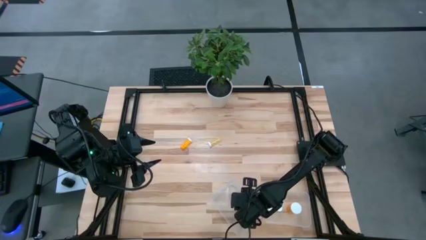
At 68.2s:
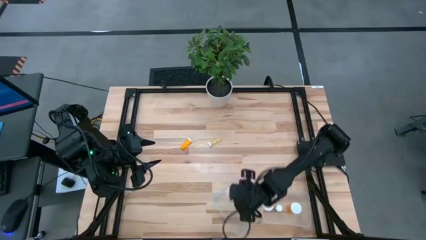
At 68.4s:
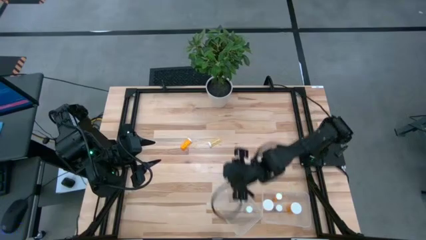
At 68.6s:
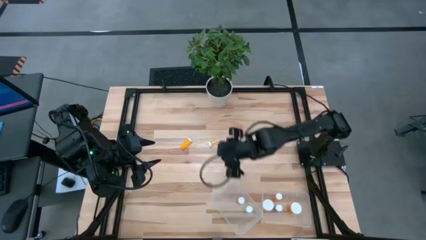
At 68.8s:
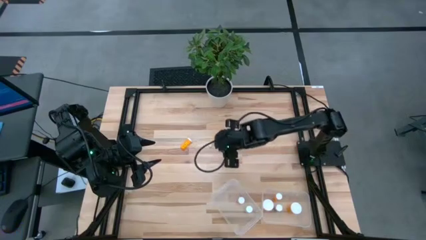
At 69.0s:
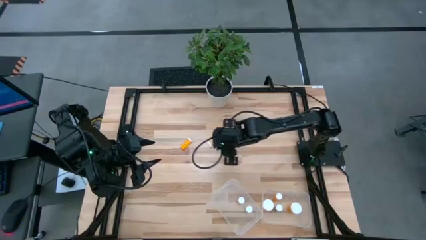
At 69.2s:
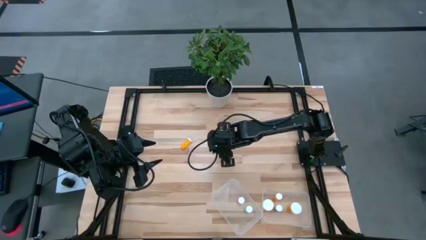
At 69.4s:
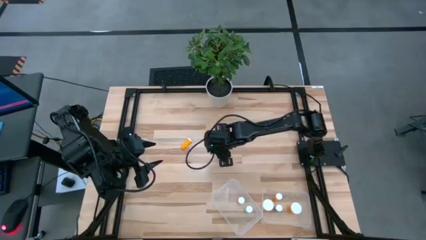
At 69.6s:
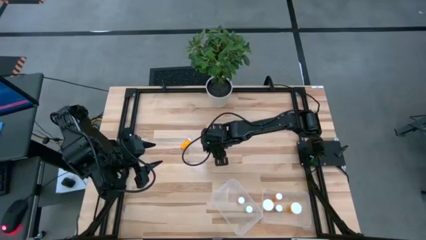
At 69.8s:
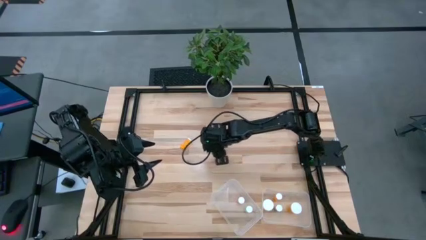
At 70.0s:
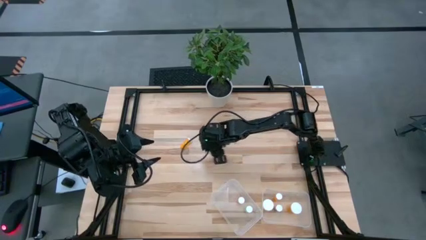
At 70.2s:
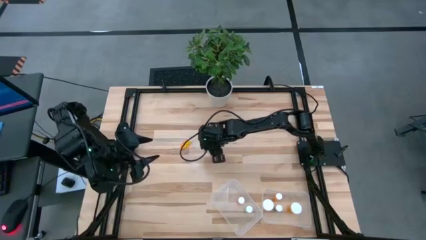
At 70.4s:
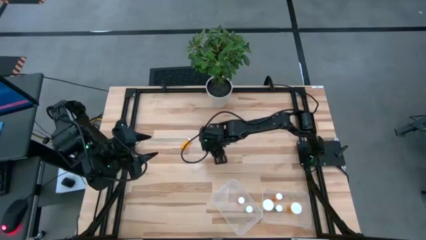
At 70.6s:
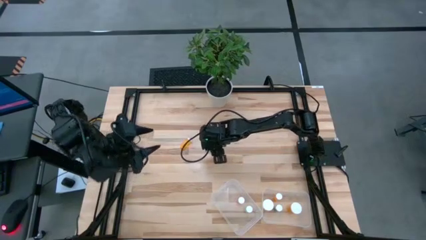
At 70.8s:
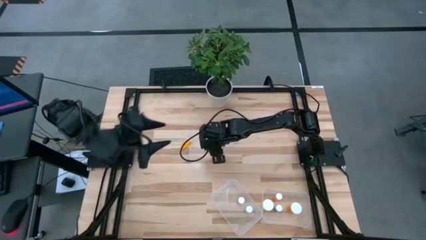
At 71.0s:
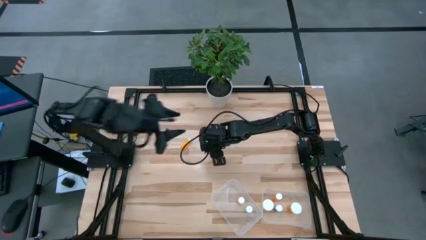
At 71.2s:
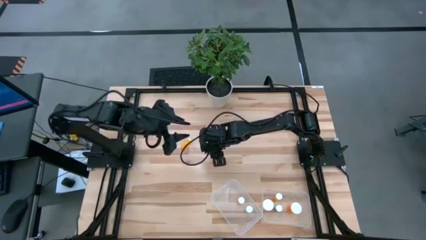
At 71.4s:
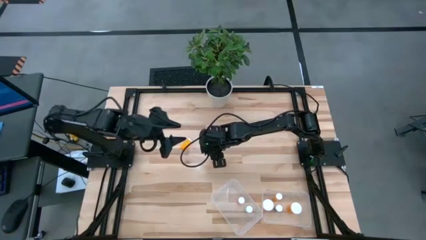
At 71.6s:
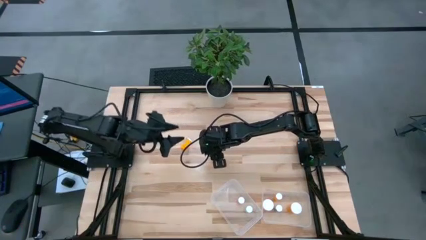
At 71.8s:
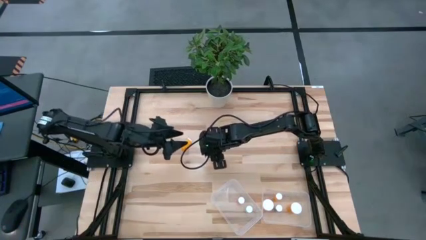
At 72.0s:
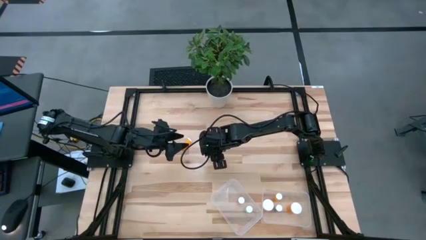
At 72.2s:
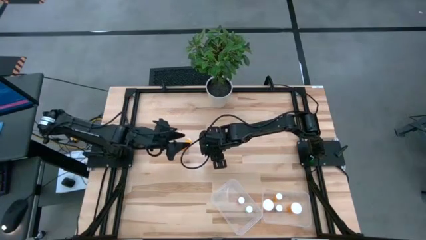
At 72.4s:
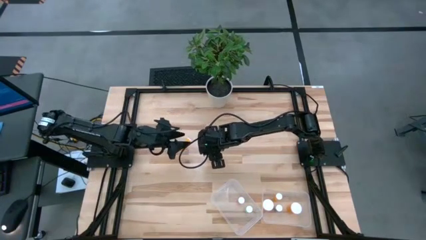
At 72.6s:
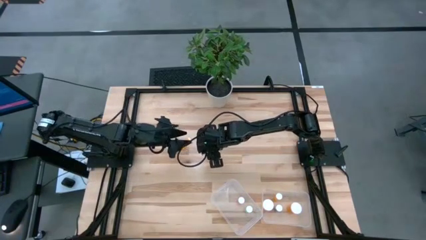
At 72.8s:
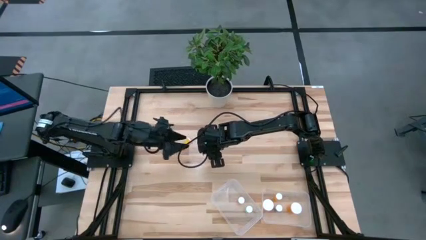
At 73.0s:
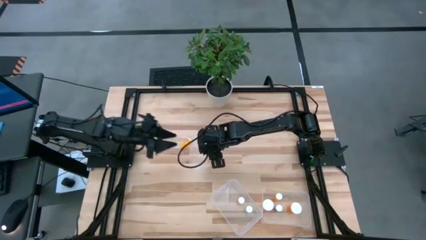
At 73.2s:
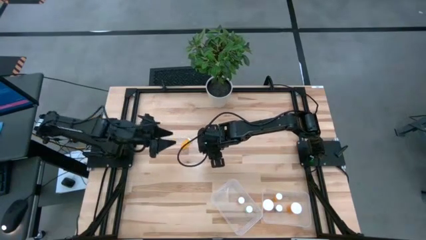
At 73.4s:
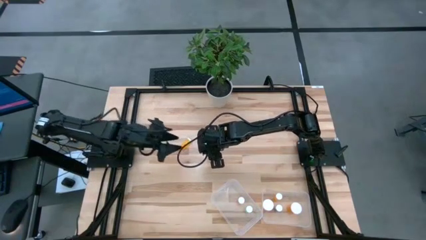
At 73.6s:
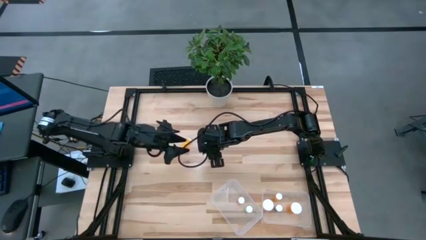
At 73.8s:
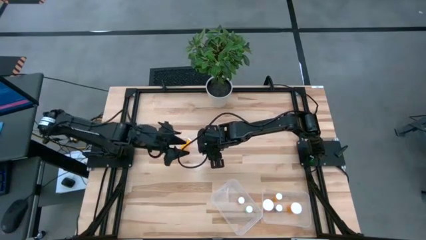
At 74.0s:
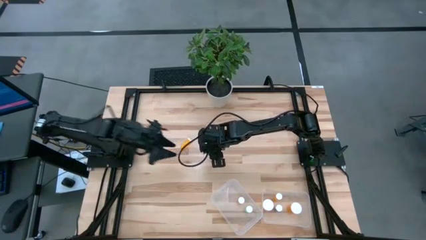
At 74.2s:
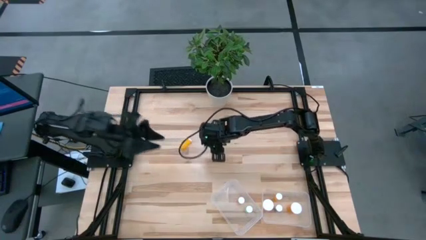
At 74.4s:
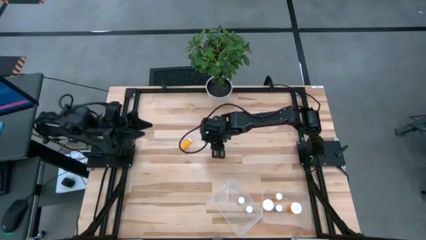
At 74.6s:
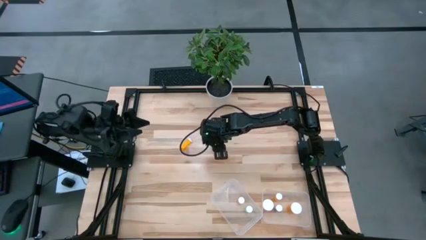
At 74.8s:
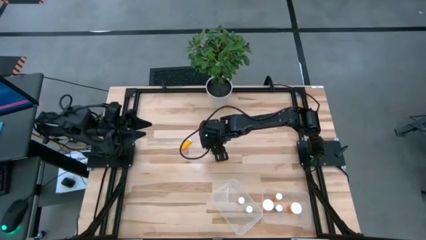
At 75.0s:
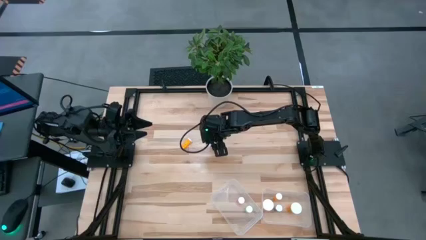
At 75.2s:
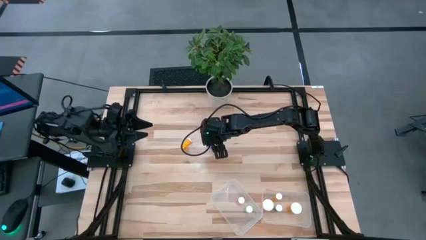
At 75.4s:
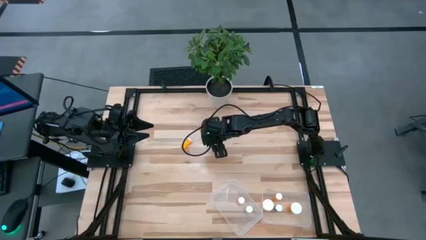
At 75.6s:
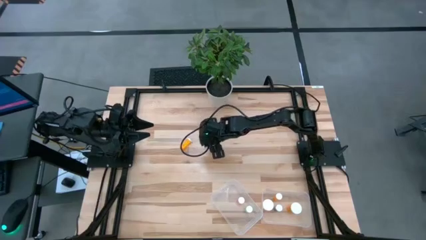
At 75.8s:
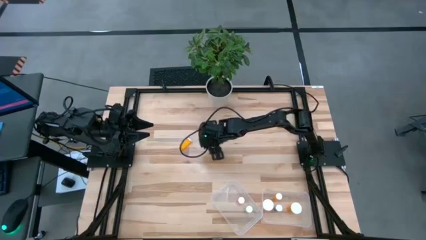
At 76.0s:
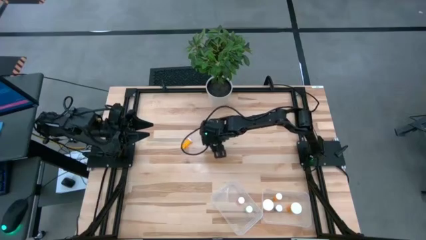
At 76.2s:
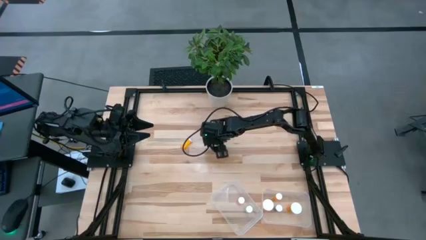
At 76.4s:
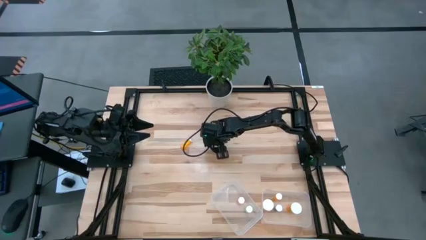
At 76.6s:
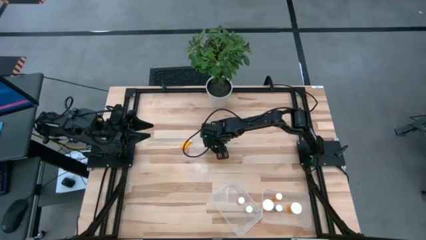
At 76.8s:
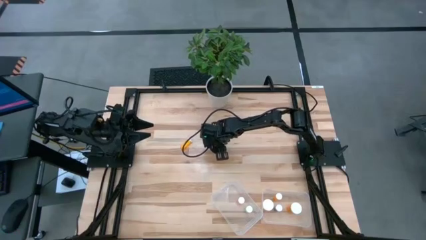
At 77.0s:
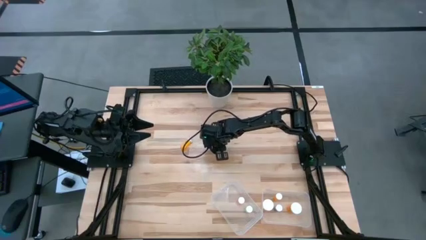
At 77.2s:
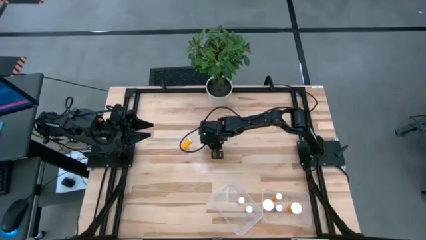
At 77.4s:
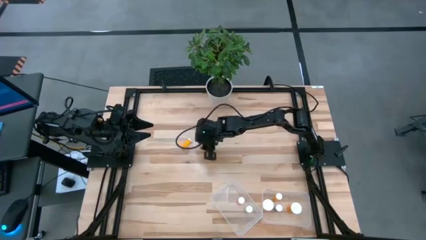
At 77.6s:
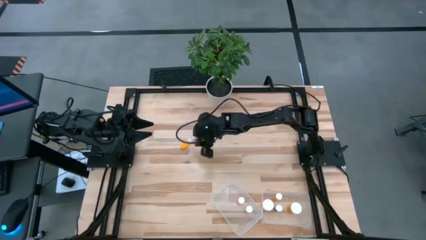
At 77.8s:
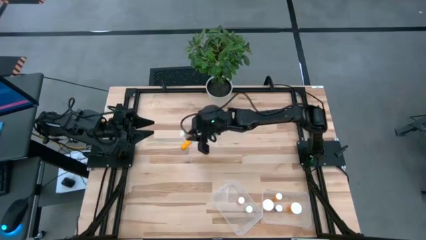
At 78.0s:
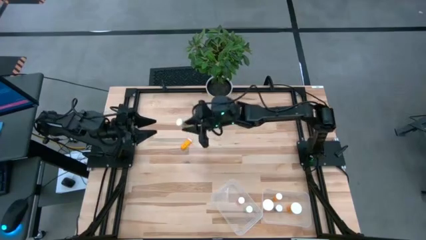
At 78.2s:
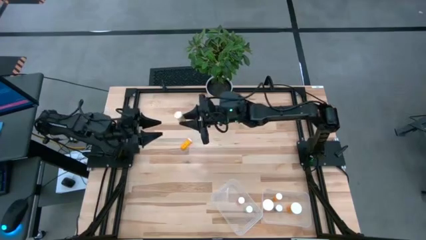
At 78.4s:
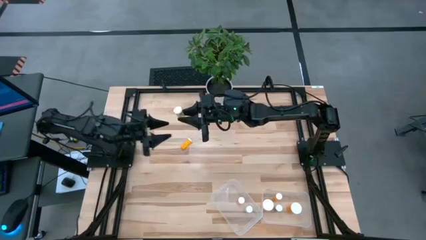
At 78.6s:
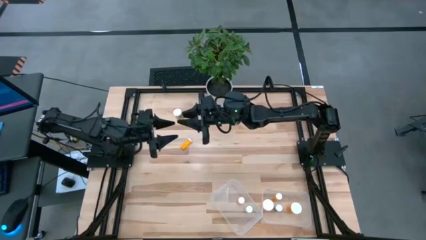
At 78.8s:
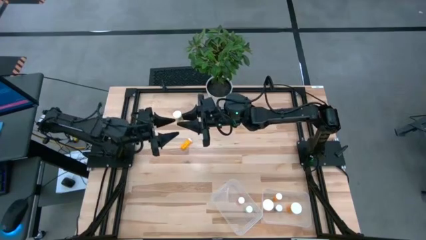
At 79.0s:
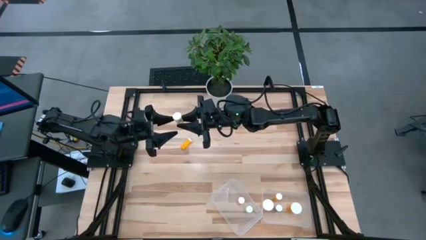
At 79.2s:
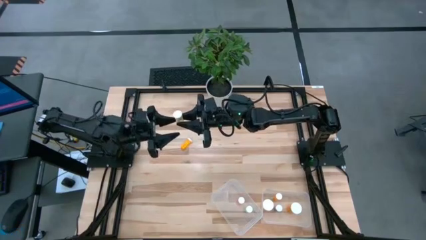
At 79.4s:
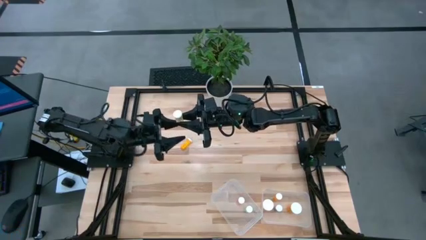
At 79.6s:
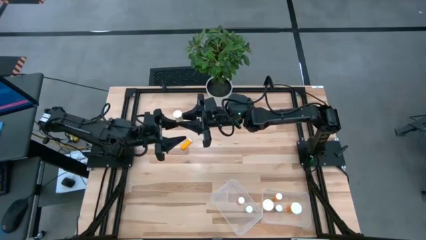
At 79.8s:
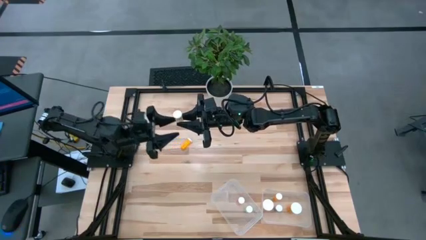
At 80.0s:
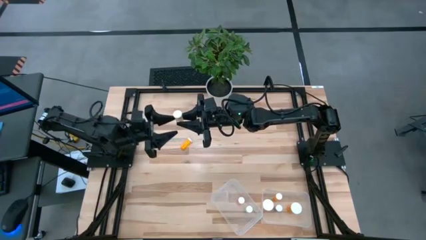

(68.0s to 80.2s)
Task: Pick and place medicine bottles into bin by pill shape (circle, oval)
Put the yellow pill bottle into the left transparent bin

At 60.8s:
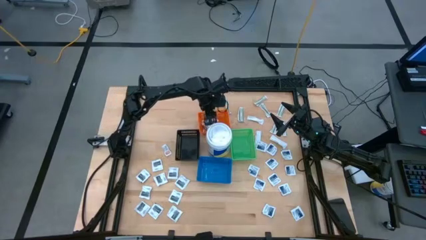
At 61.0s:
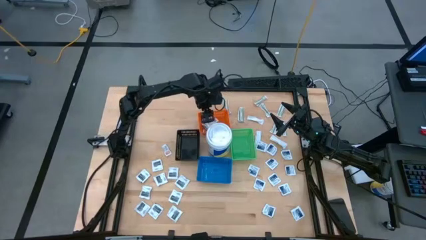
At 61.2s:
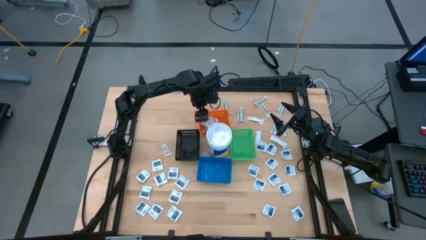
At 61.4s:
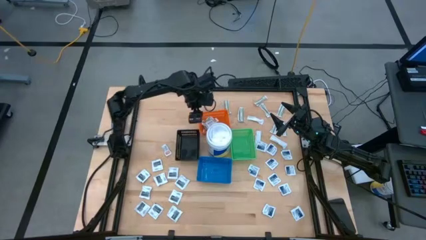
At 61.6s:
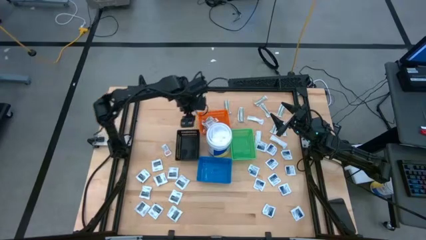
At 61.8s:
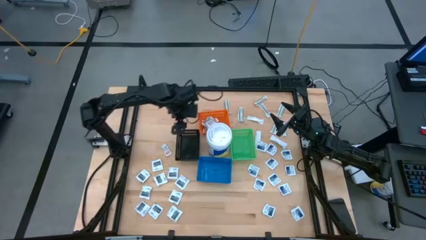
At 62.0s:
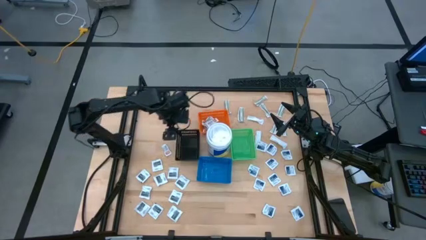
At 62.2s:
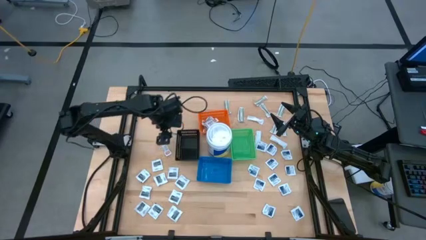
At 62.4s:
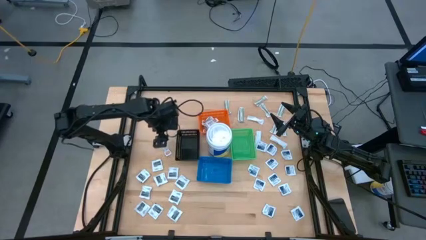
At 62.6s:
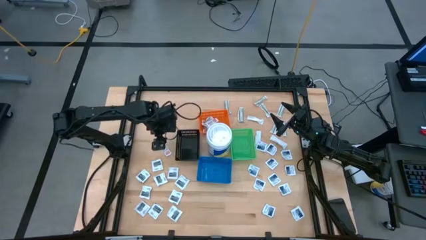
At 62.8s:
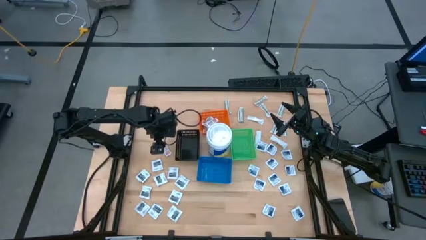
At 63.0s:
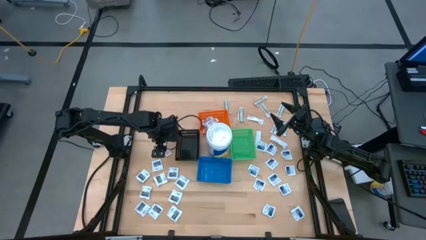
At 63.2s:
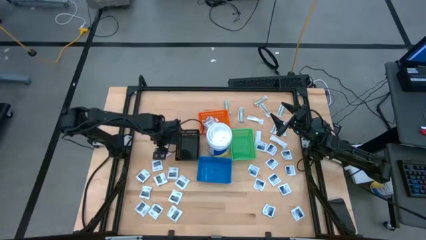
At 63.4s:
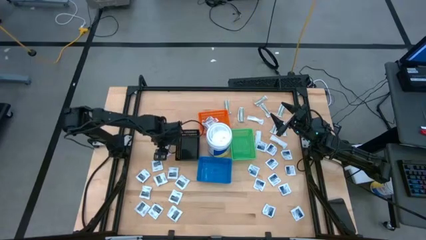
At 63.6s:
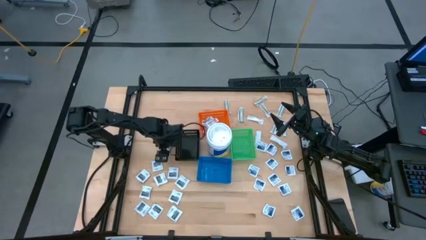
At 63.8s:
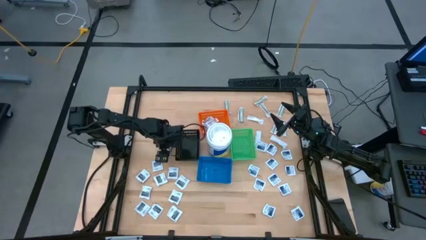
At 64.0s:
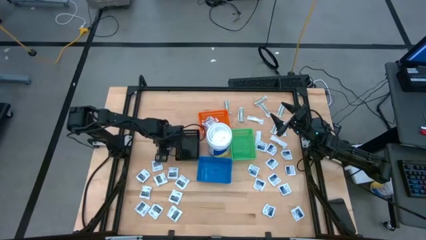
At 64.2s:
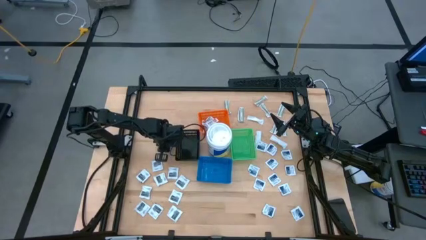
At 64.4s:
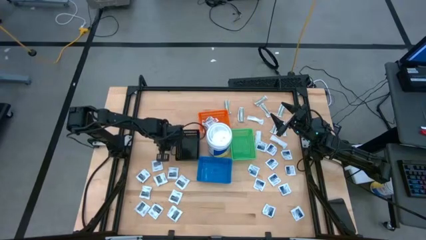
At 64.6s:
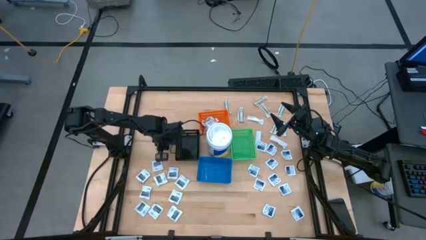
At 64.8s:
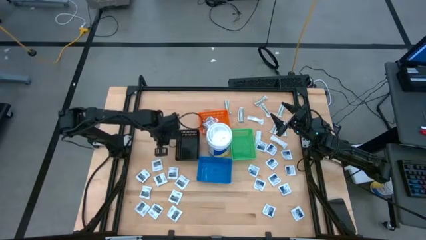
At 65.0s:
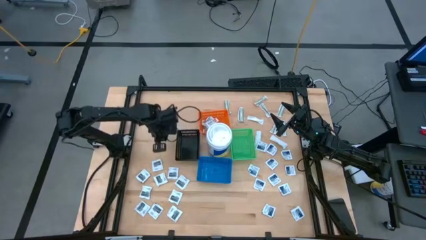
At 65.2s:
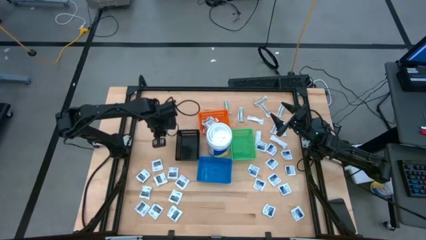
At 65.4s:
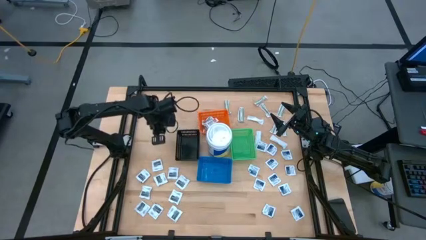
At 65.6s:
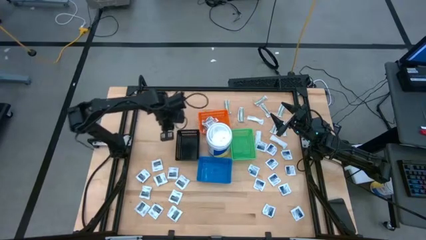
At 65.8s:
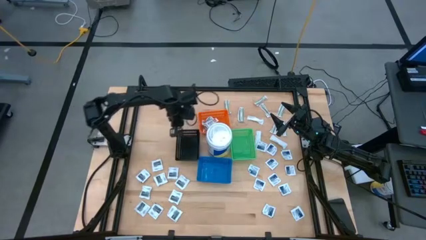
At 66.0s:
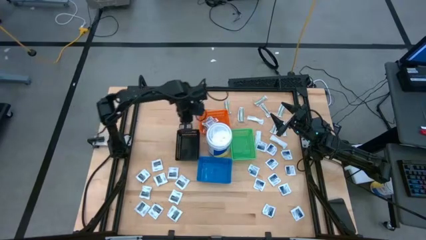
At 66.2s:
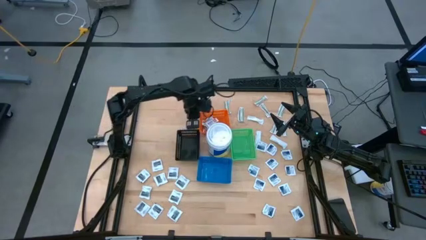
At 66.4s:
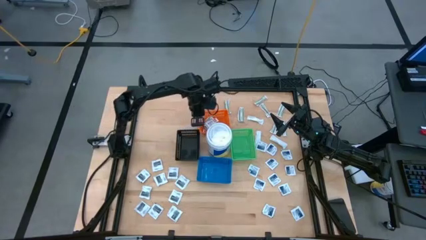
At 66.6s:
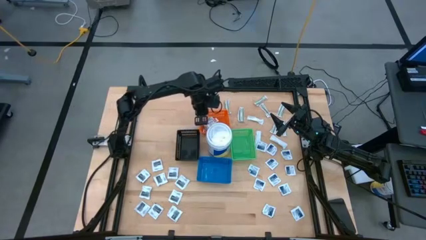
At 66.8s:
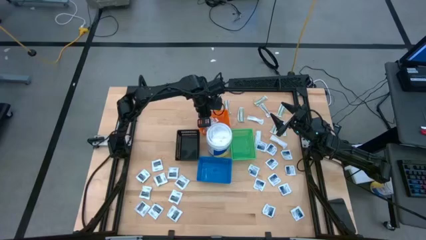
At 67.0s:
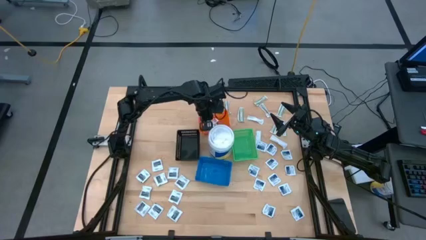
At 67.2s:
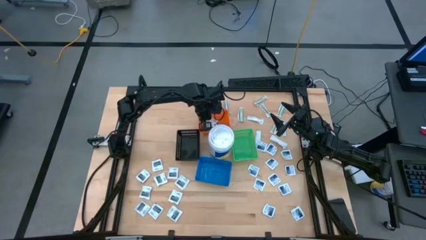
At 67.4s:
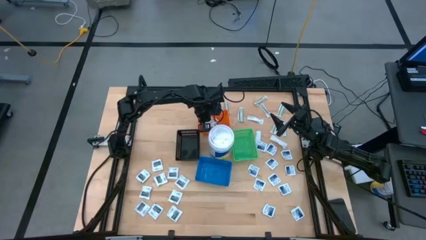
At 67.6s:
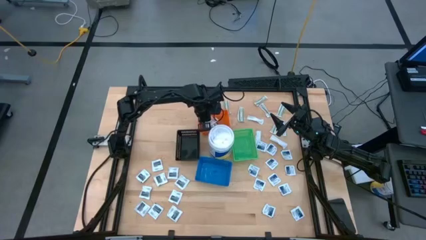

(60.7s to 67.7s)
Task: Pick & Place First Aid Supplies
Put the orange ointment pack into the orange bin
